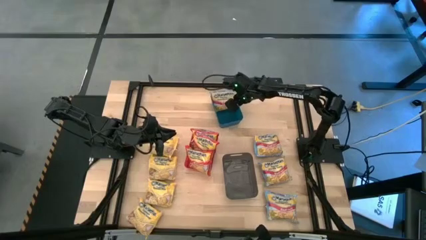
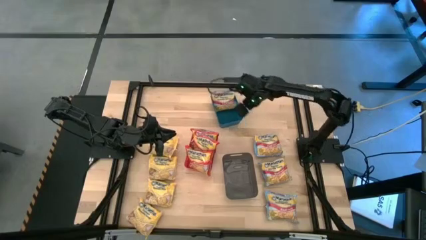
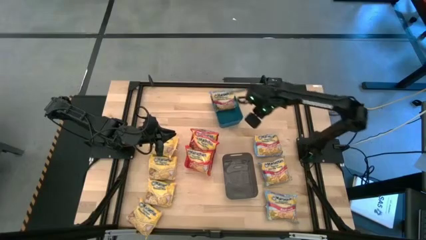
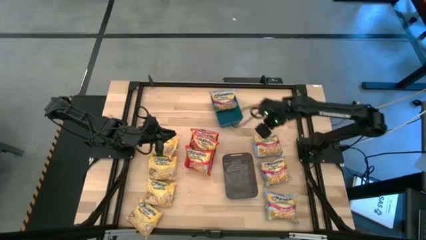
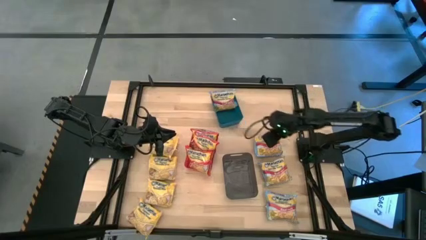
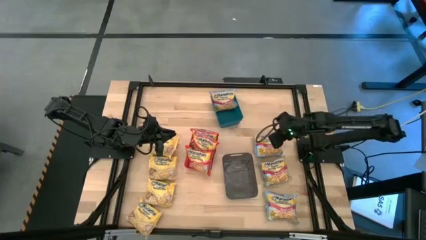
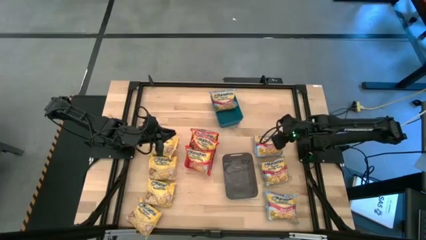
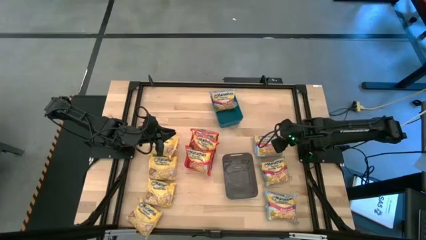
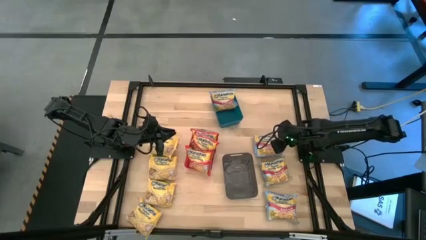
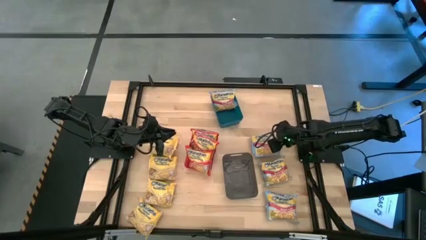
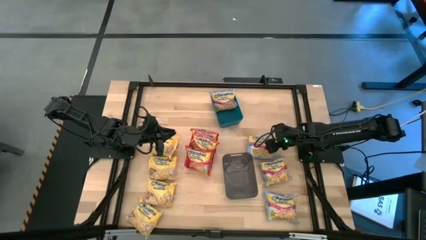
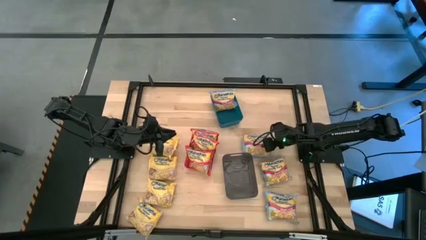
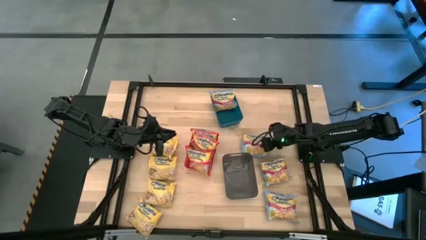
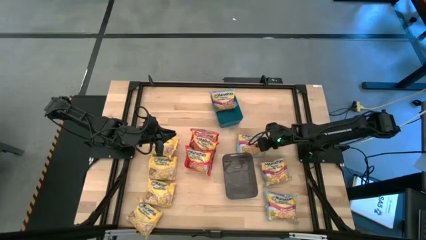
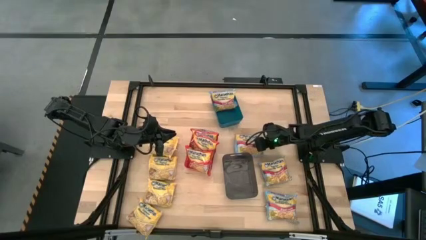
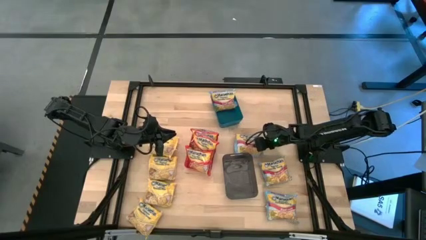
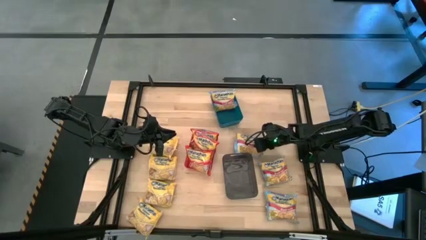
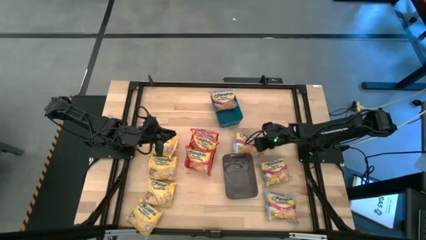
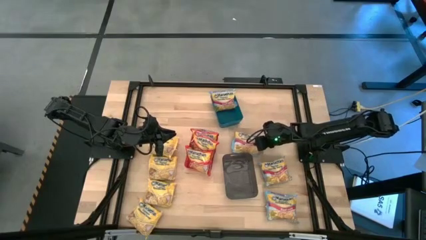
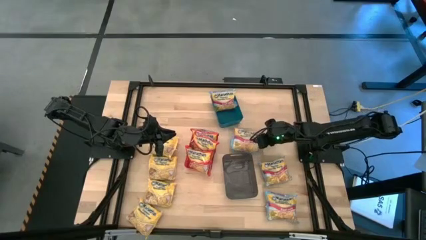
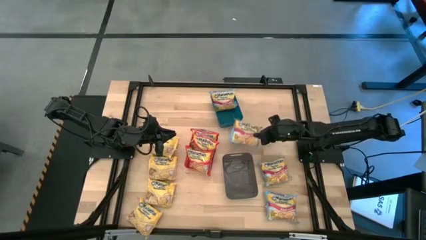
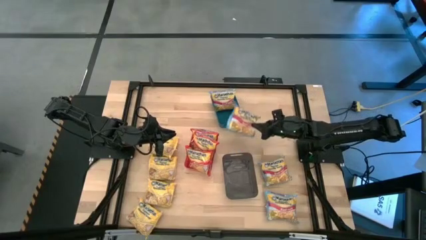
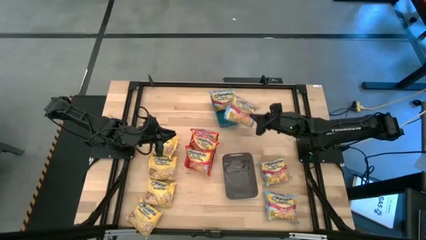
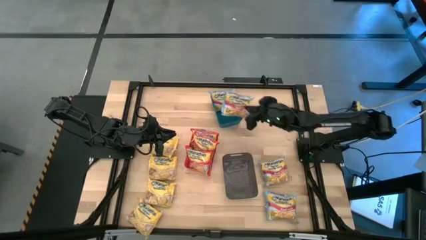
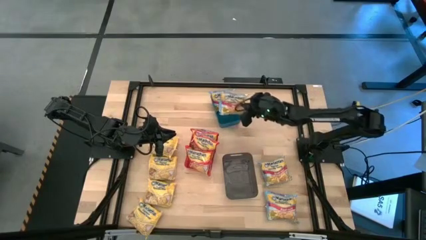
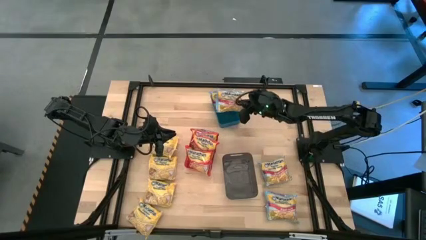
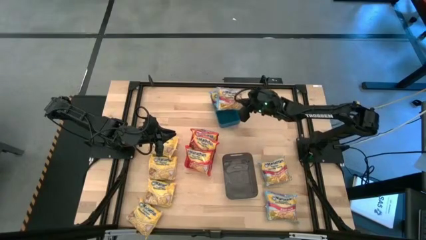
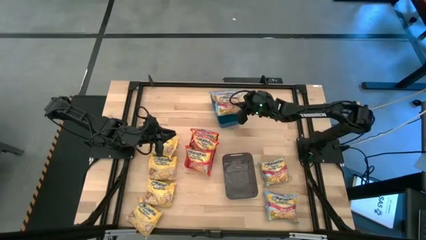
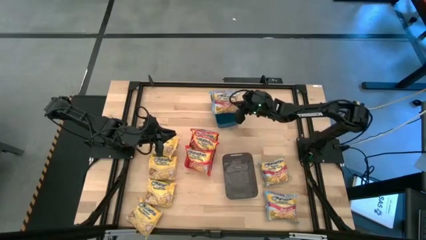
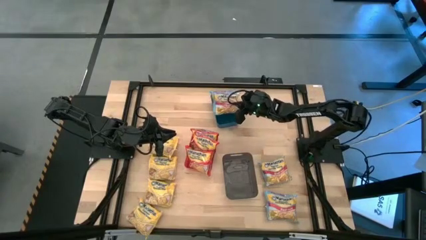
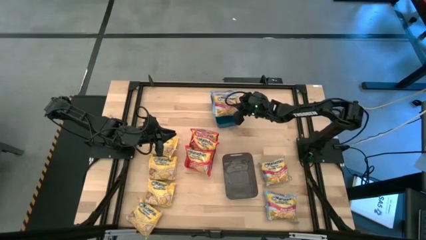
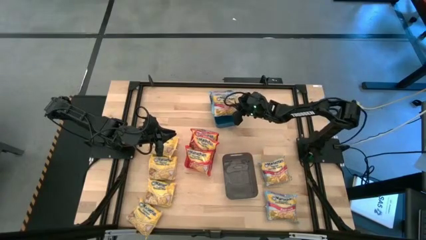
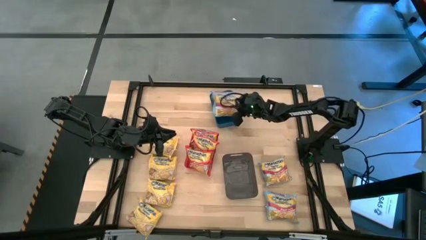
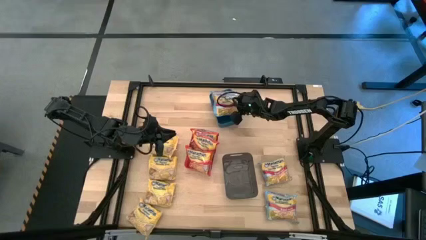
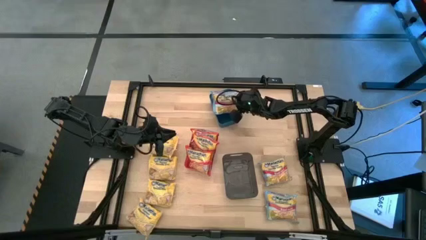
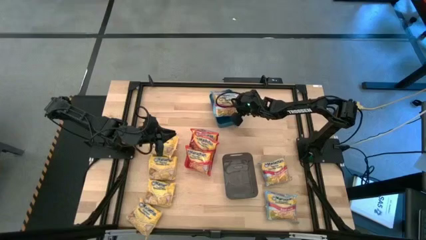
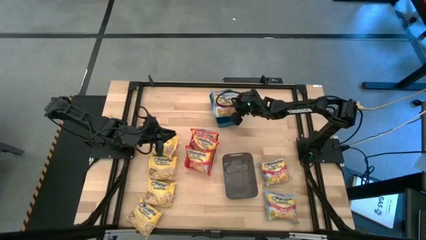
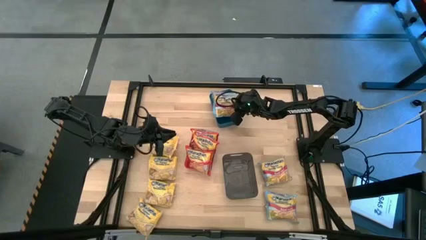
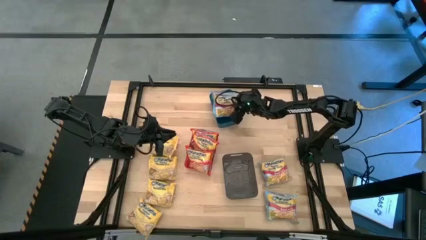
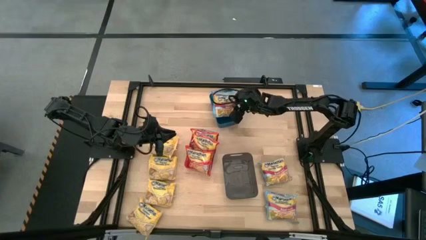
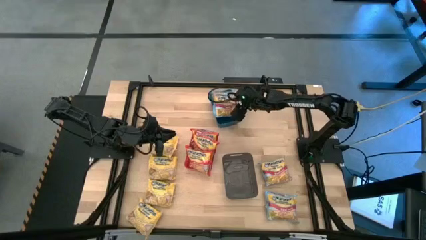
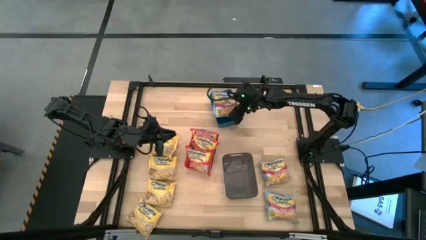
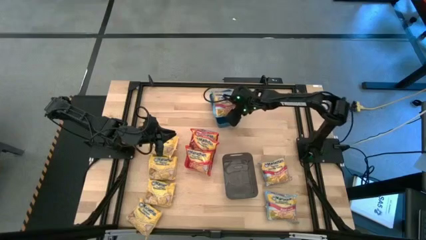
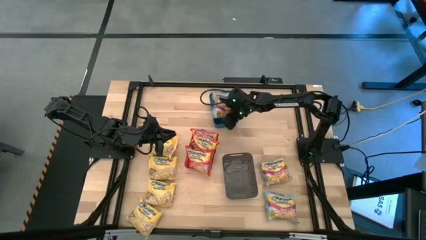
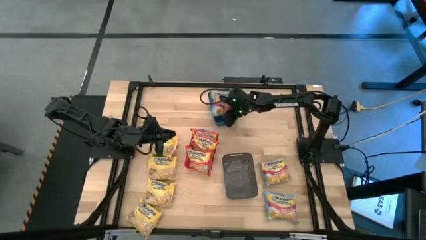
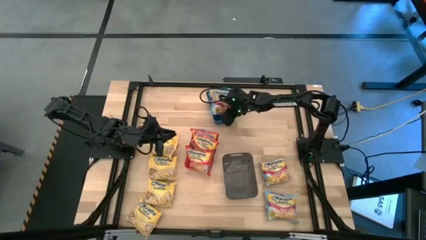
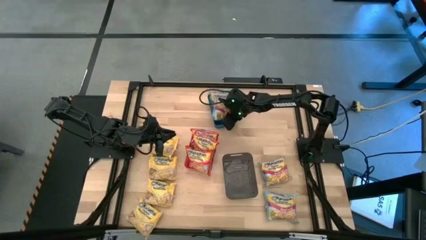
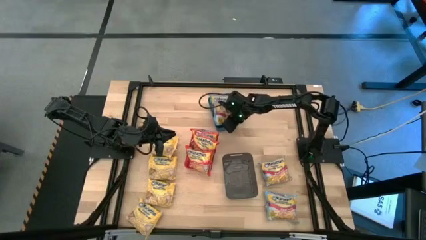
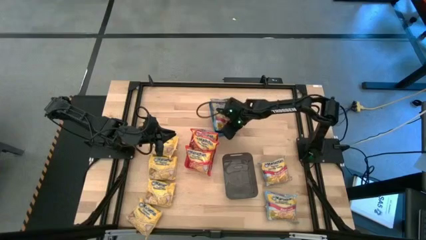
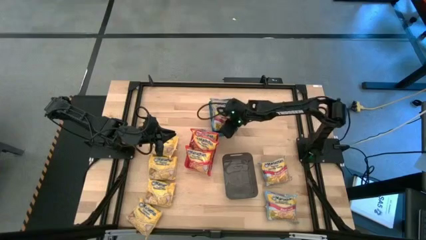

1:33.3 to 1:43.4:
Task: Sort Maruchan noodles
Put the blue bag into the blue bin

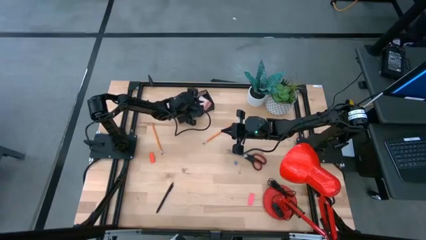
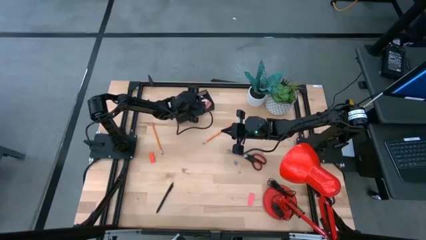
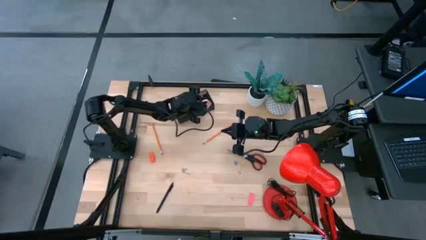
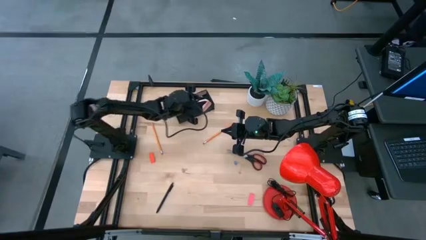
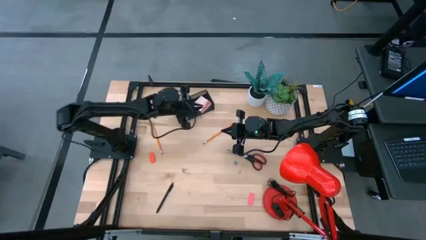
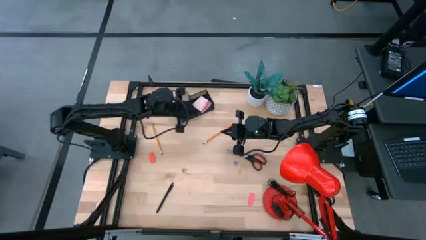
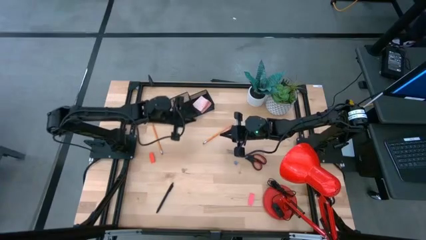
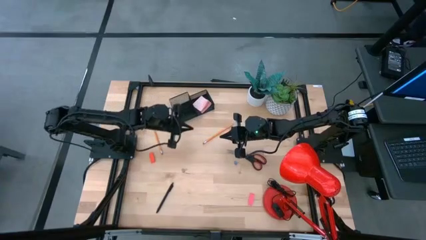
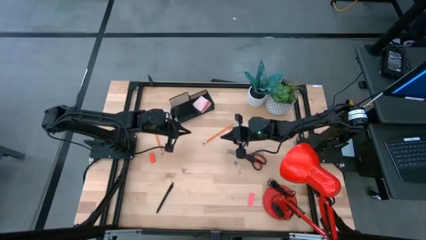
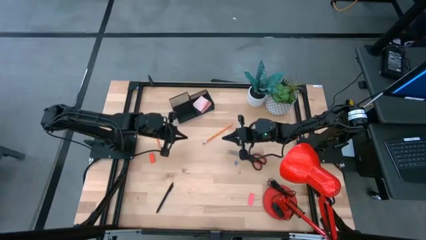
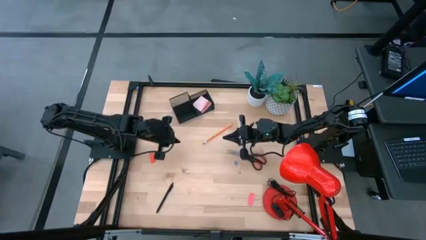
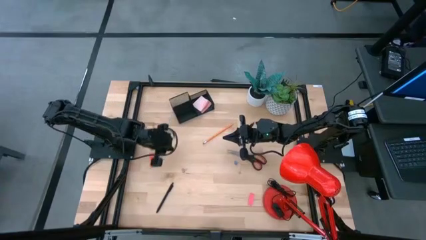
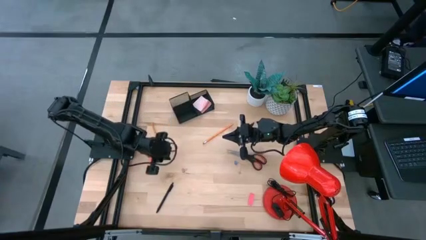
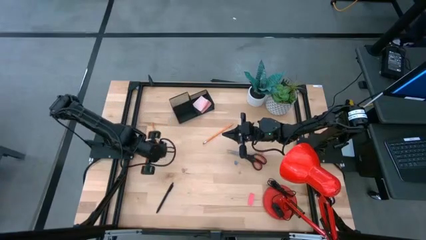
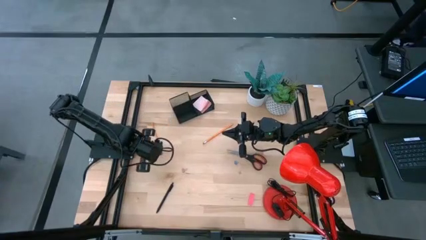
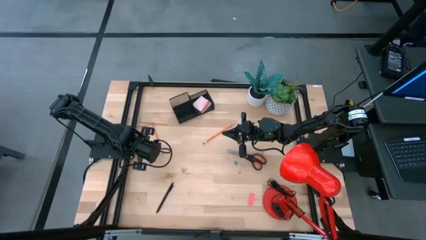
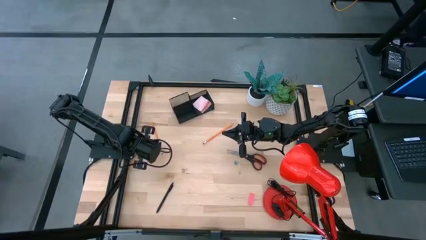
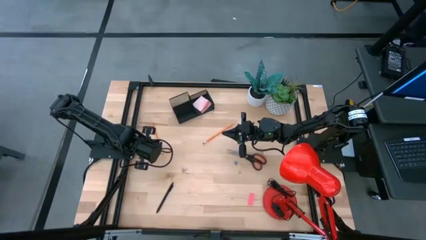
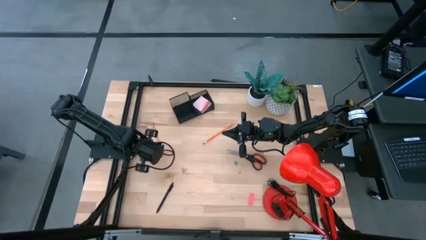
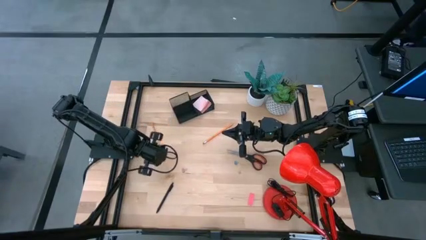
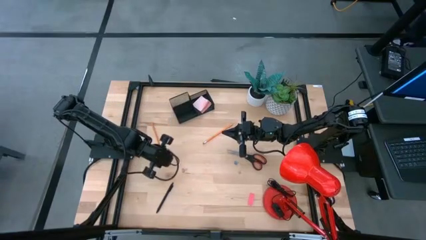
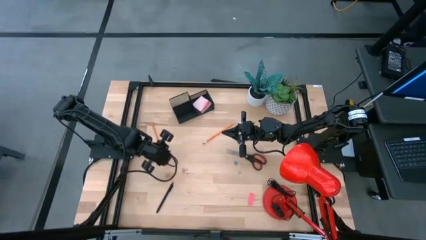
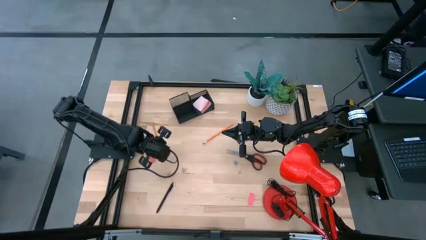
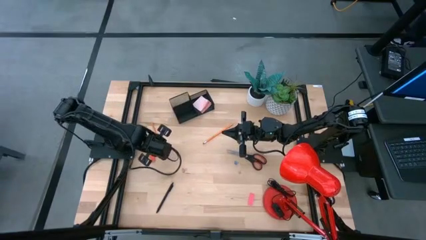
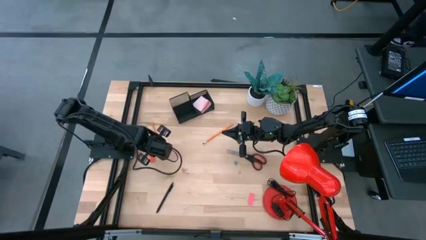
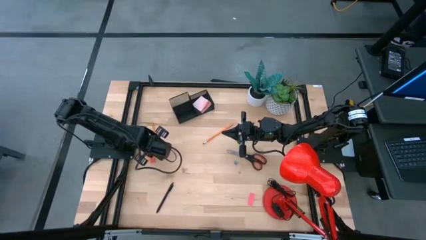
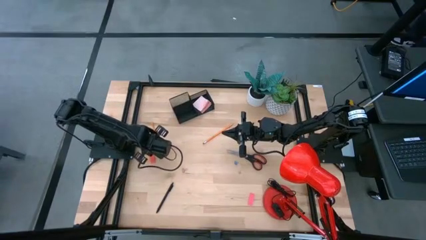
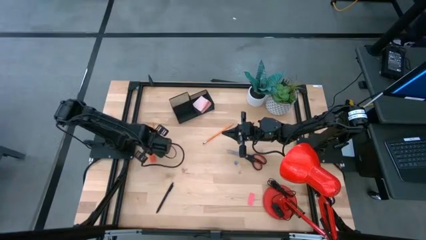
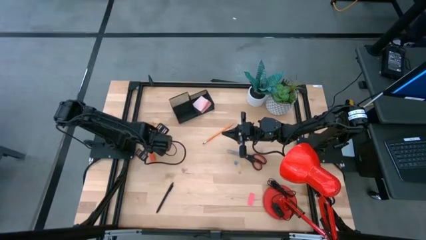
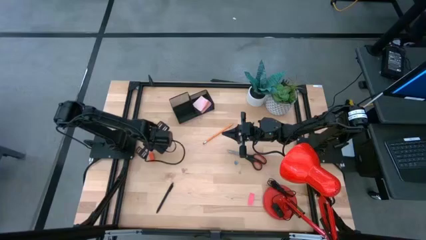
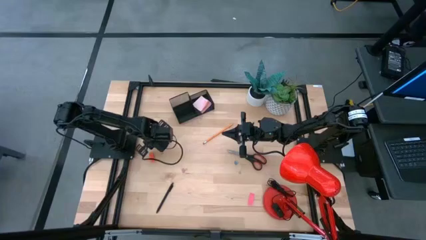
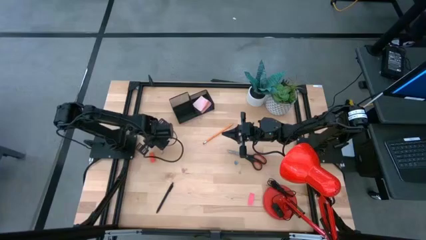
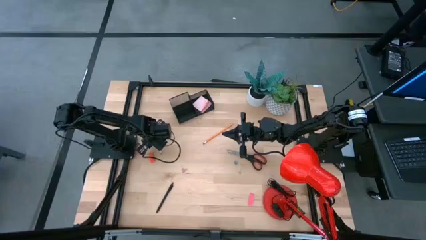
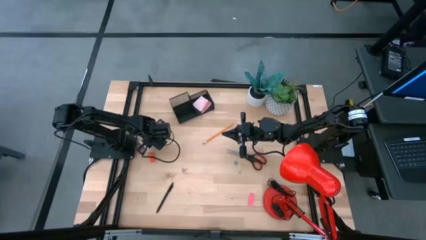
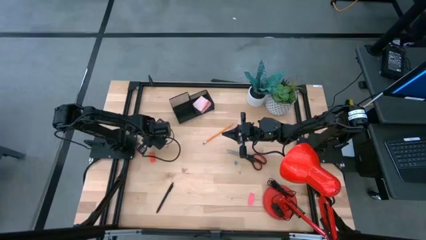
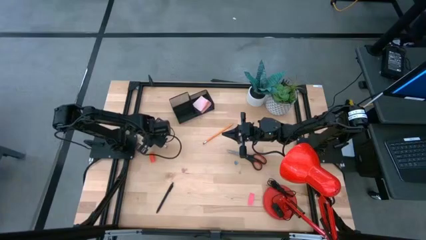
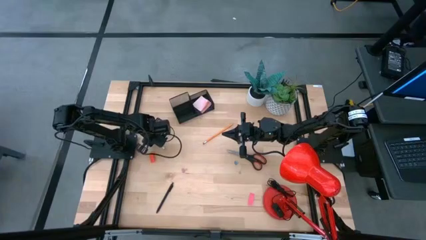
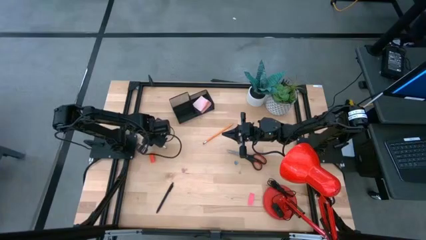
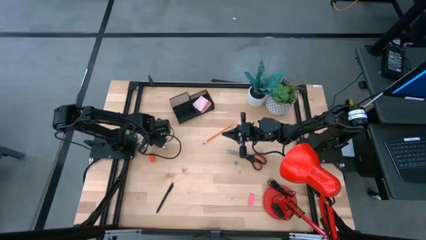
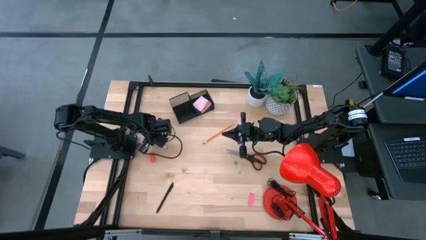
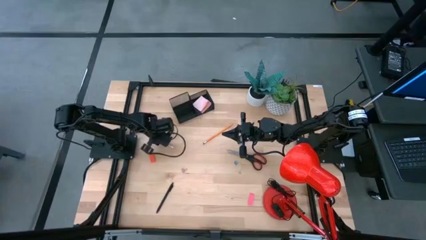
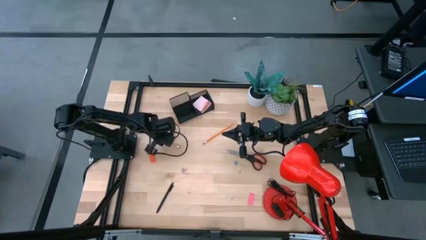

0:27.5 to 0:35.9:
Task: Pick and place office supplies into organizer
Put the left pencil into the desk organizer
